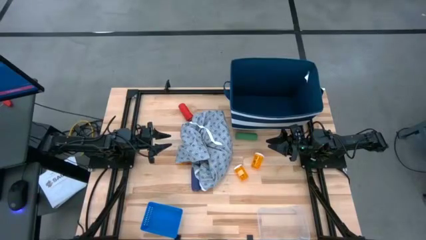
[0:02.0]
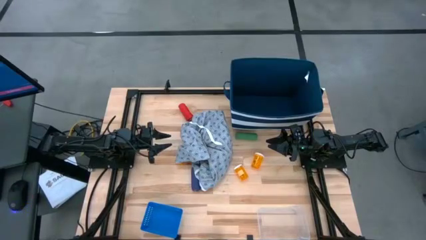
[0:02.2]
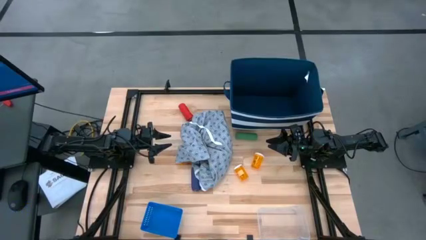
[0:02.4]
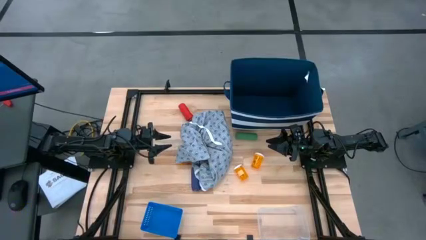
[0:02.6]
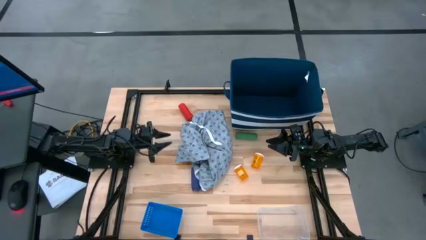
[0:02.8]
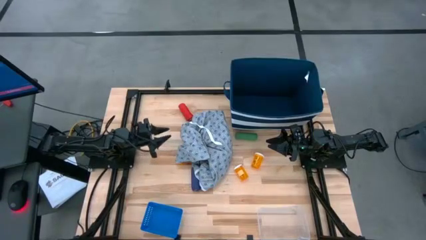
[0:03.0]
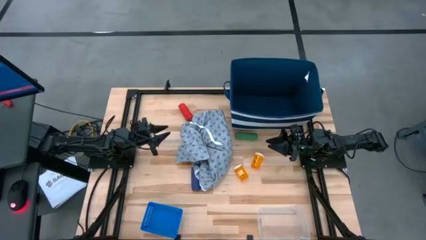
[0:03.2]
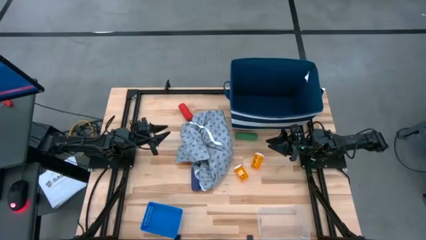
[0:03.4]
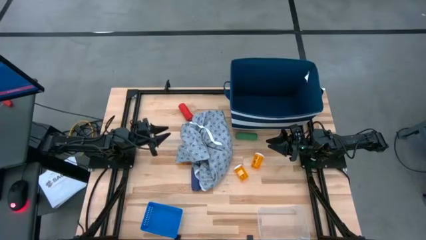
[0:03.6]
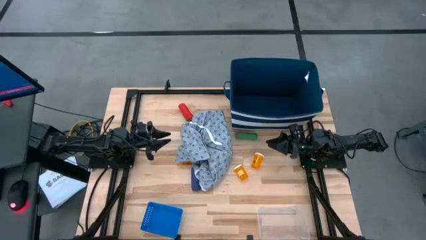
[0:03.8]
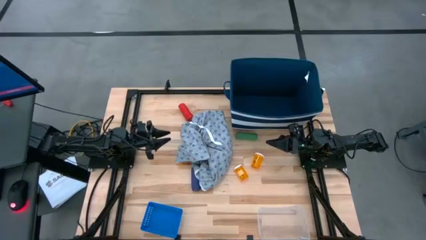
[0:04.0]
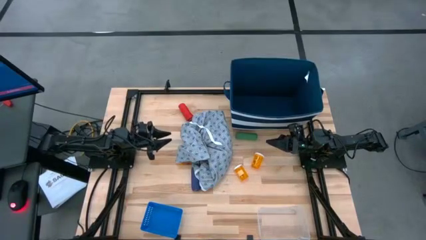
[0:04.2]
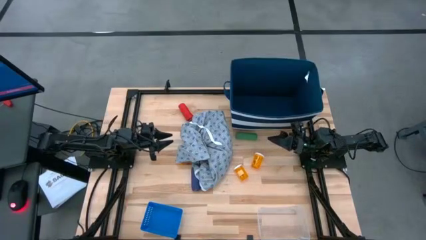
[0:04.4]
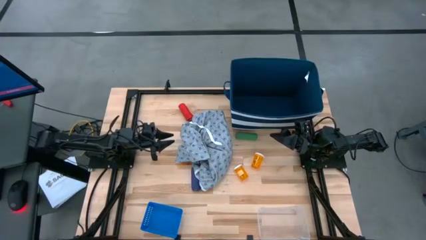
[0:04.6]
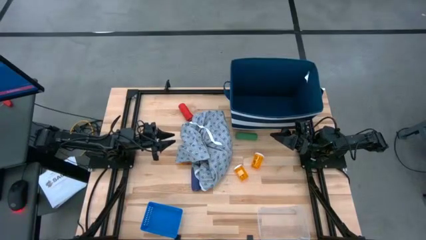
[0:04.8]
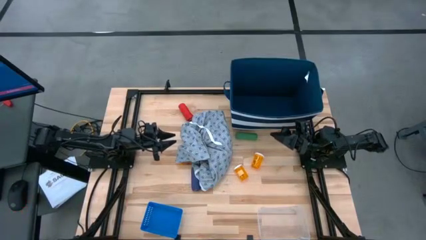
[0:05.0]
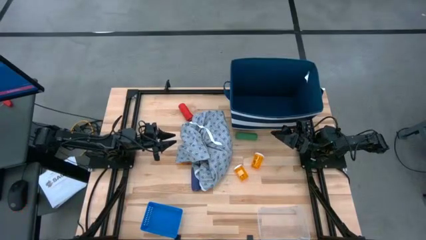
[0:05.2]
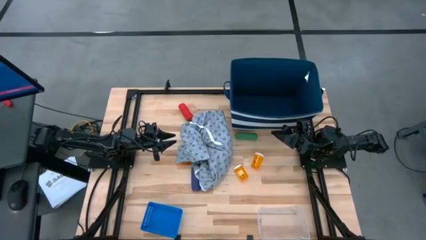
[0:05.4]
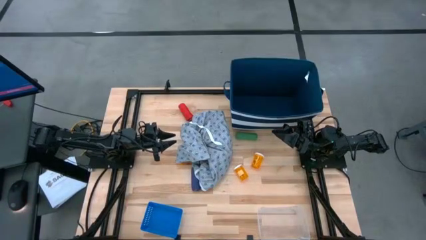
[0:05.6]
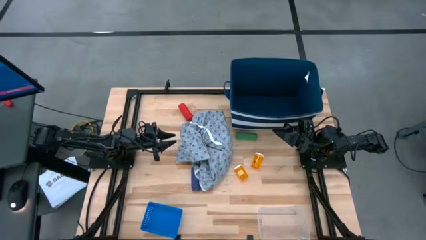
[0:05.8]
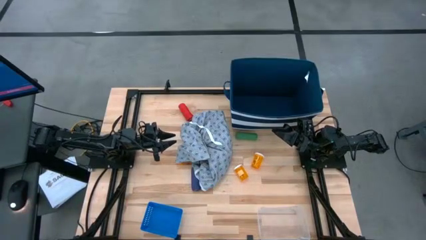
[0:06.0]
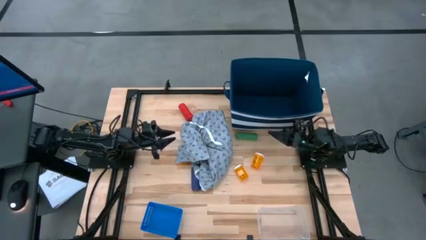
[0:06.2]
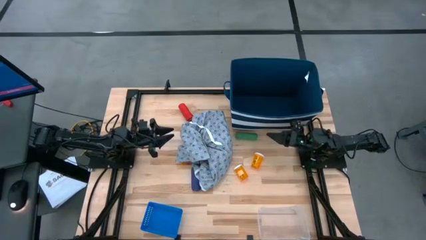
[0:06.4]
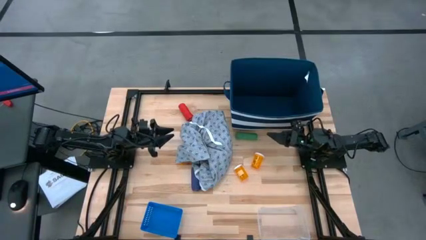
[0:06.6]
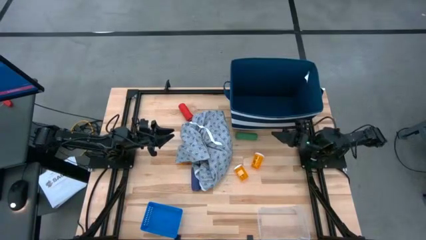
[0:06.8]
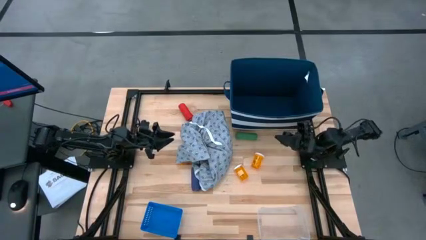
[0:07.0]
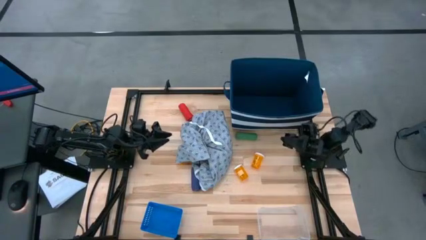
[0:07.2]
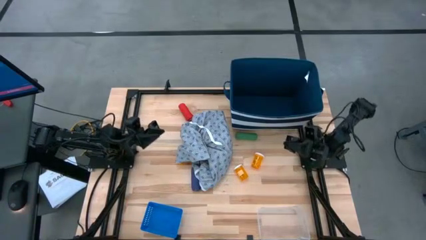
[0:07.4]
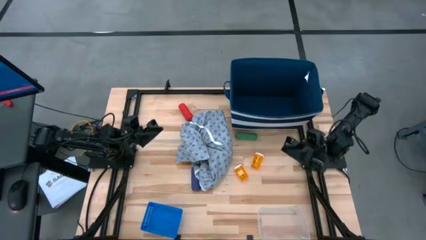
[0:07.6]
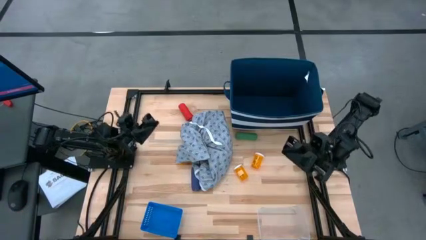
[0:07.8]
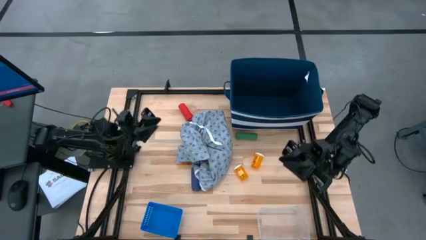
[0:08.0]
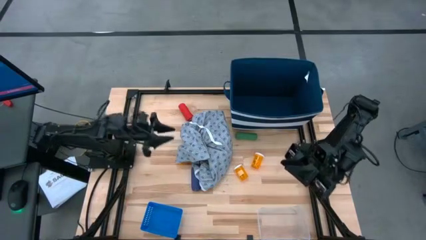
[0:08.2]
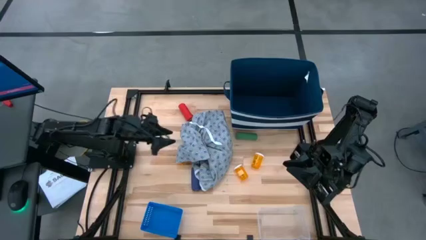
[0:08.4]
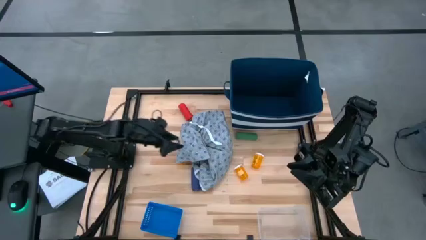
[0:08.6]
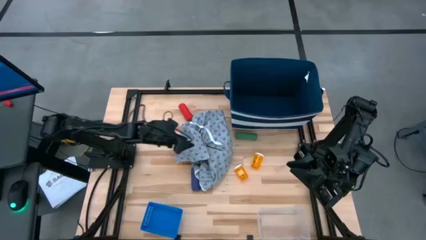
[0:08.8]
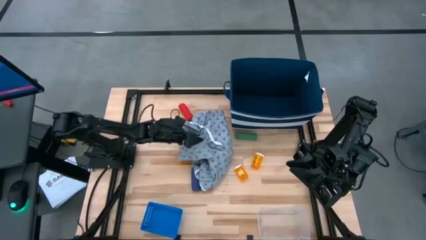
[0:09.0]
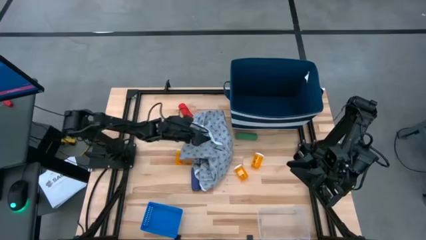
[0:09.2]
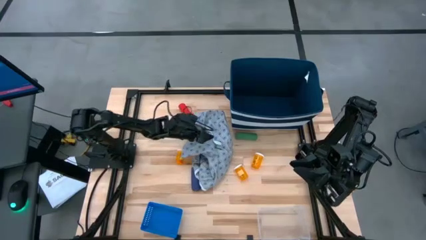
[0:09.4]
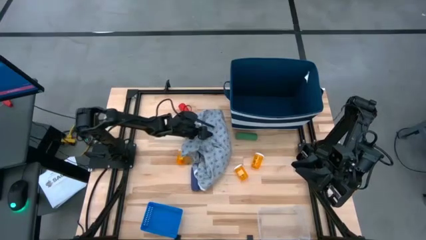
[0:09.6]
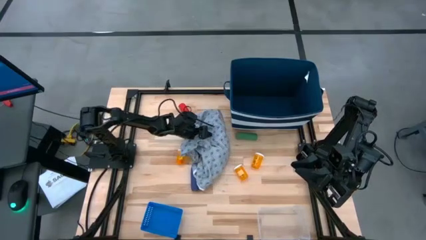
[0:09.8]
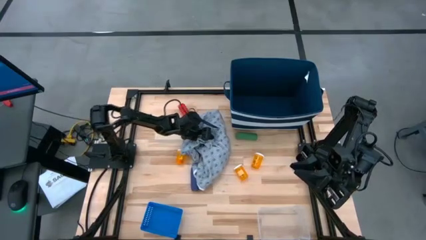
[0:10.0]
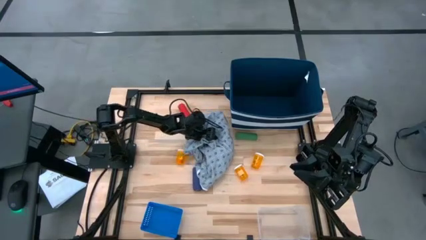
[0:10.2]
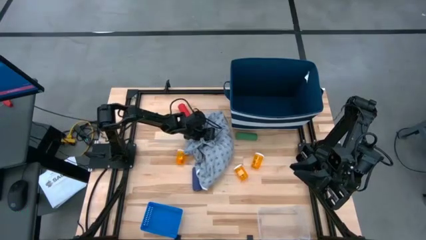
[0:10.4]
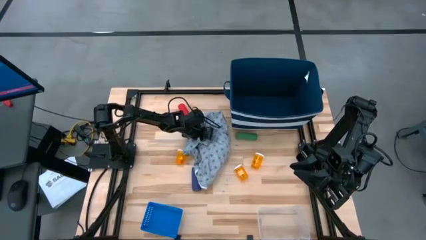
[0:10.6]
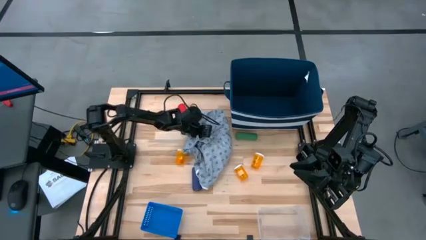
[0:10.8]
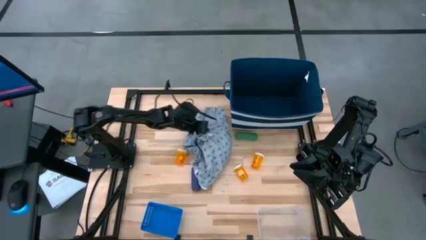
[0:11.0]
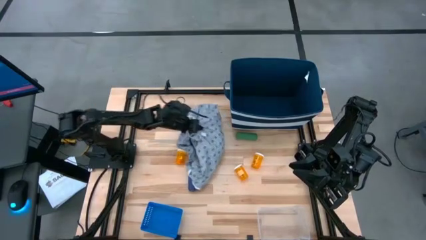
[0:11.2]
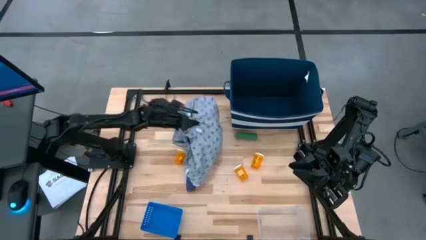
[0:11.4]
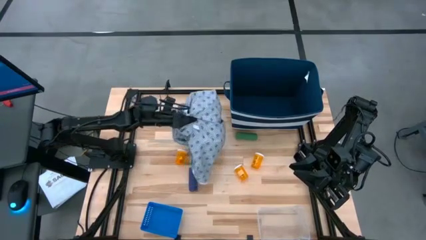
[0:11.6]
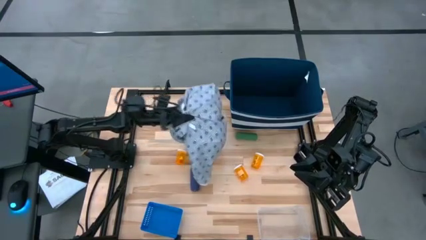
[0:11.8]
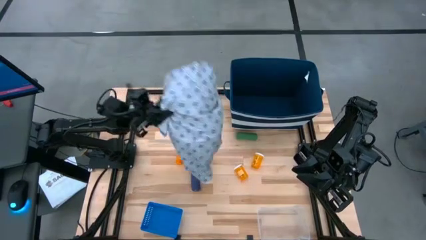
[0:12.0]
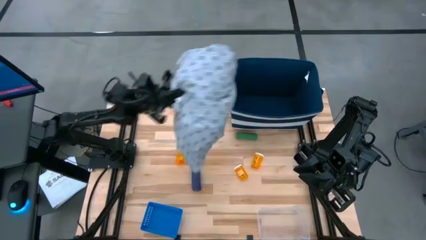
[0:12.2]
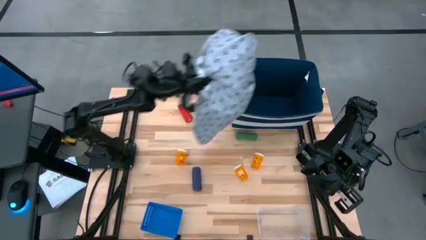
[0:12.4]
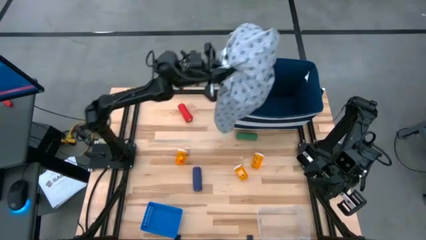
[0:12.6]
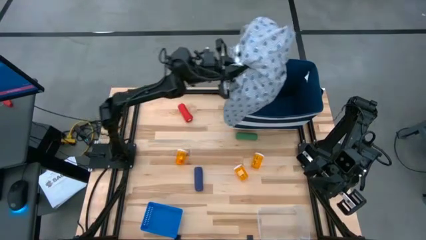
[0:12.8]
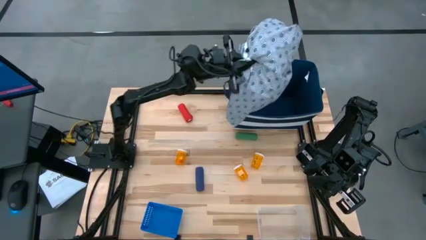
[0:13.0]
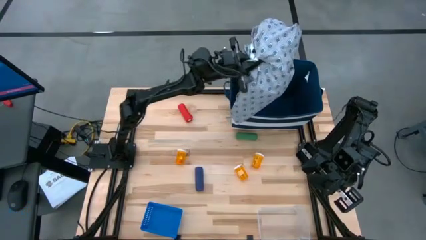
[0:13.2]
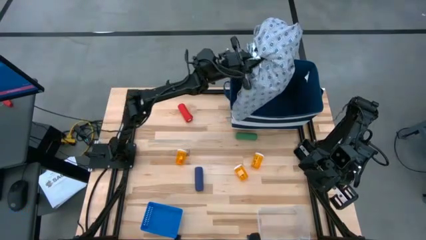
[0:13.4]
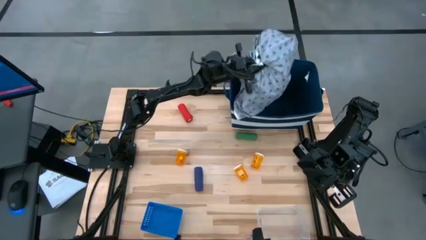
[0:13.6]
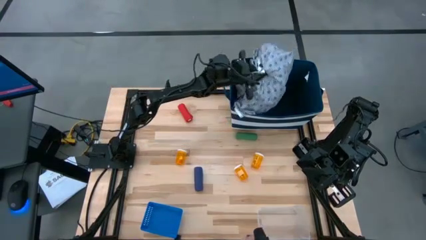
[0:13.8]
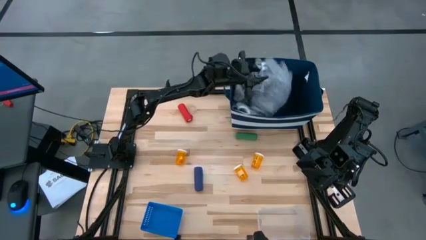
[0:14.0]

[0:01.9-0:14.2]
Task: Pick & place medical supplies in basket/bin
Put the blue patient gown into the blue bin

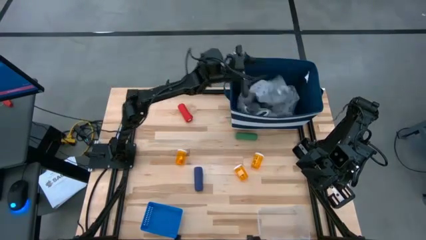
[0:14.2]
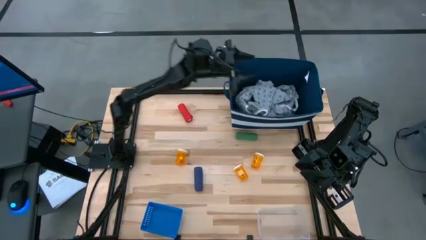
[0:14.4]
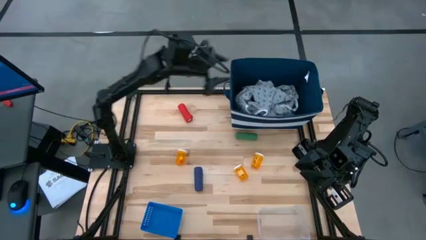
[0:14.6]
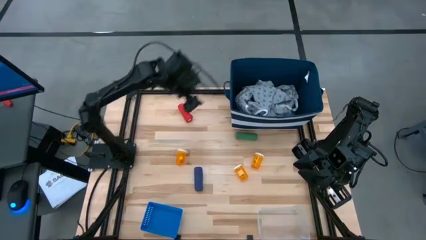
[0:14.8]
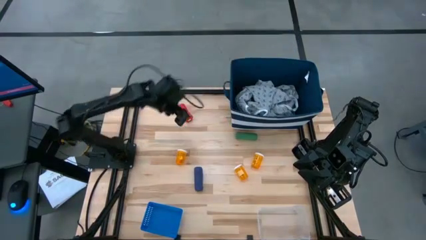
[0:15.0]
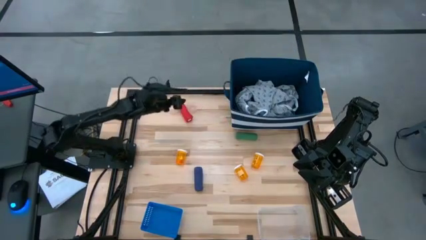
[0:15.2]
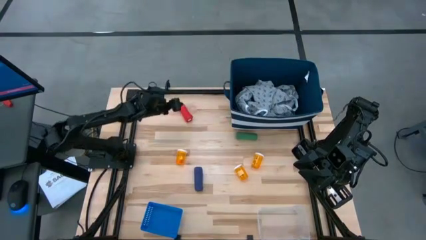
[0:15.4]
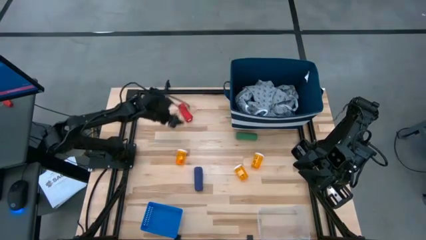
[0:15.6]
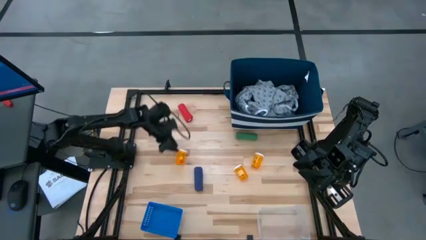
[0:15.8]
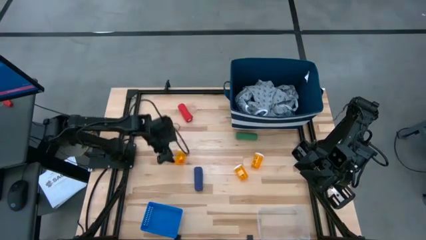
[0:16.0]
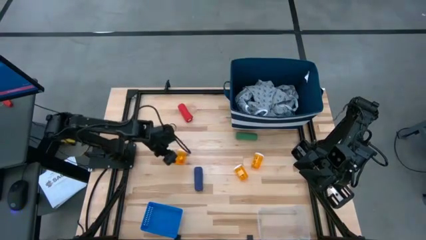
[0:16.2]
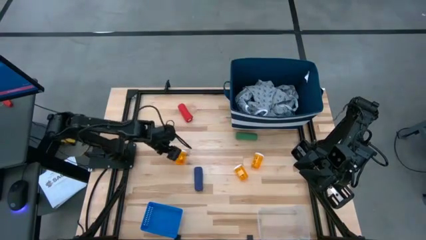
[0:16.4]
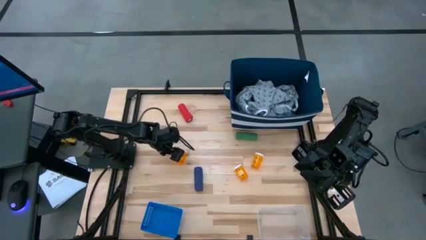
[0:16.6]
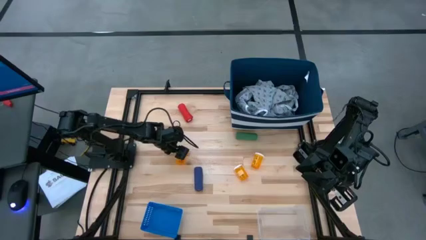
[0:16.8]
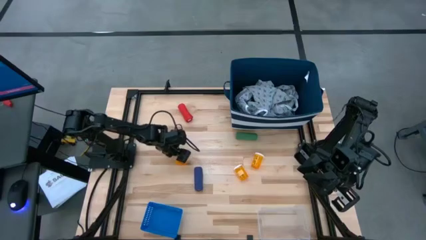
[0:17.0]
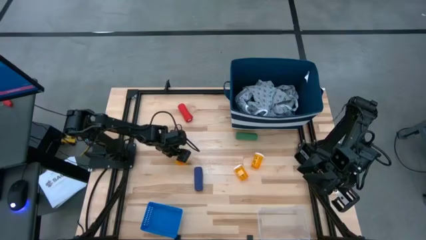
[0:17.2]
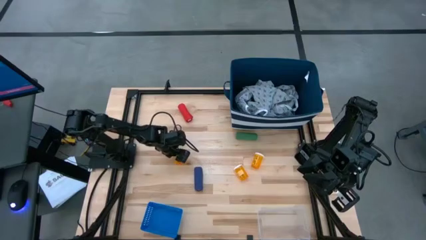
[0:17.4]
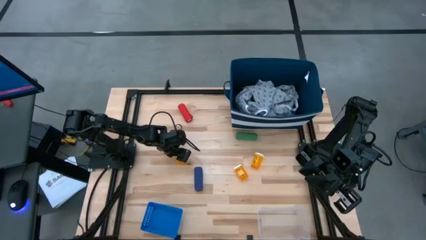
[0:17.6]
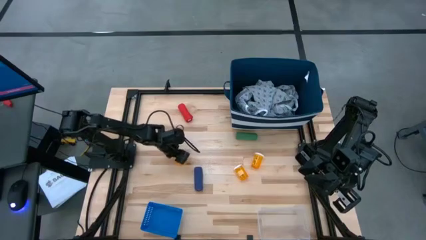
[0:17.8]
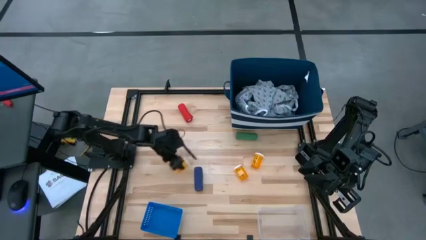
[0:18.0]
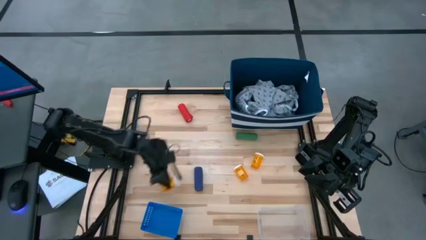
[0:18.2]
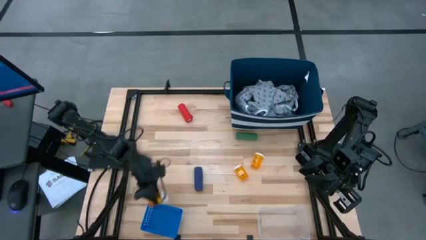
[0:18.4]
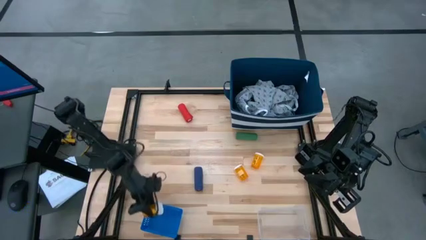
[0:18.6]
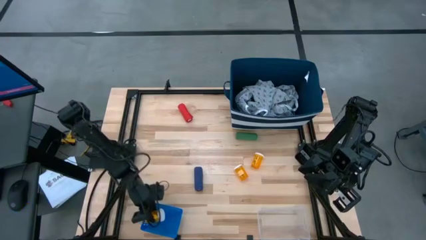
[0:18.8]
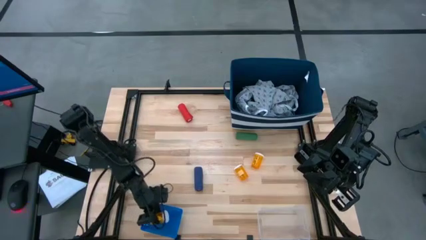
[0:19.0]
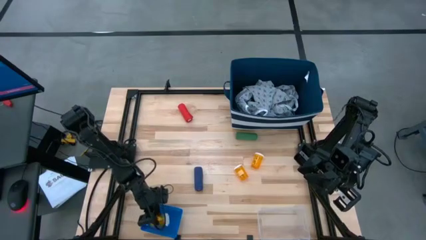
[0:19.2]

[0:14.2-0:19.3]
Put the left orange pill bottle into the blue basket
